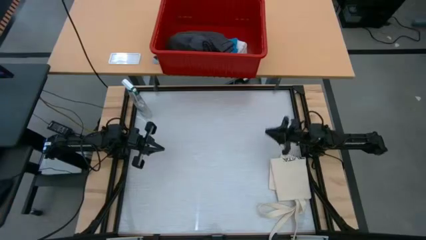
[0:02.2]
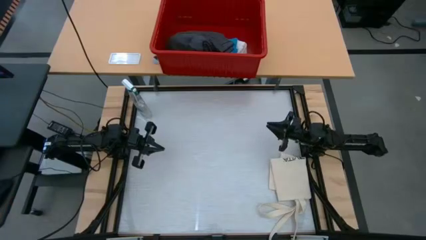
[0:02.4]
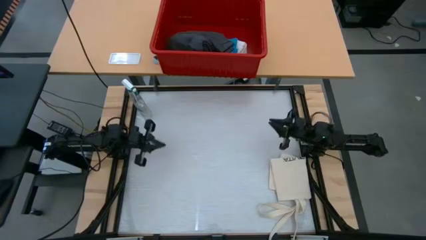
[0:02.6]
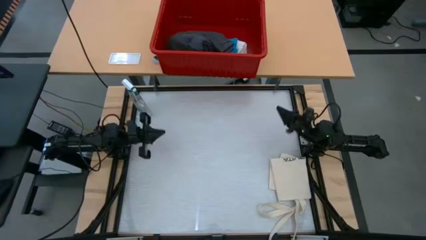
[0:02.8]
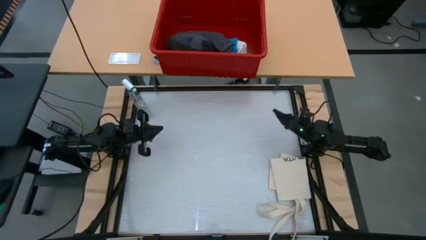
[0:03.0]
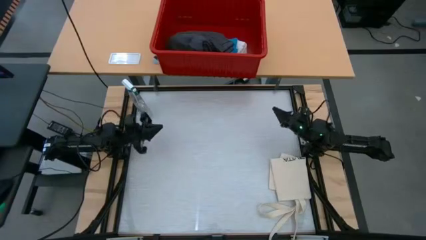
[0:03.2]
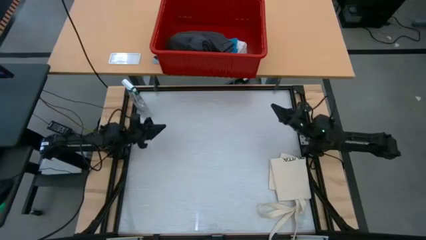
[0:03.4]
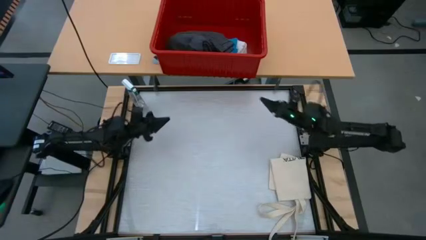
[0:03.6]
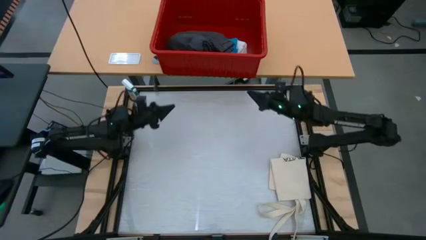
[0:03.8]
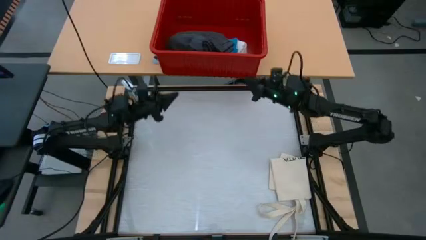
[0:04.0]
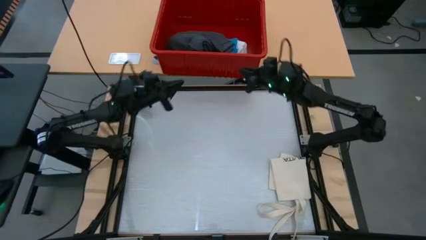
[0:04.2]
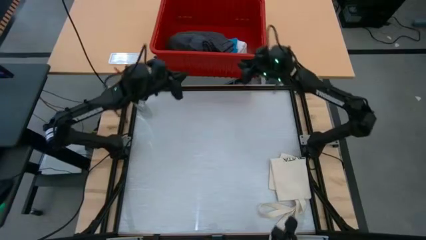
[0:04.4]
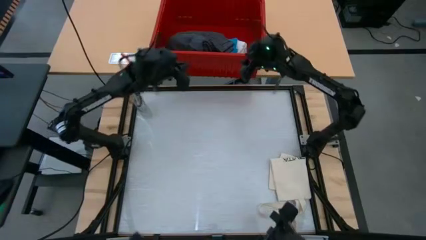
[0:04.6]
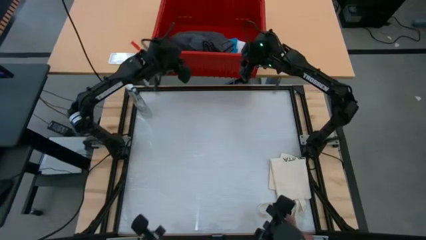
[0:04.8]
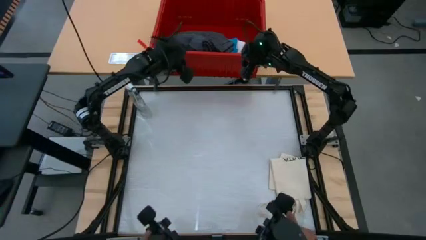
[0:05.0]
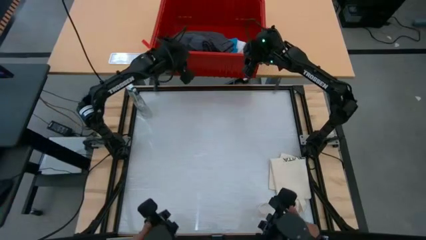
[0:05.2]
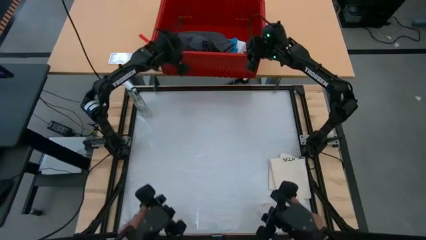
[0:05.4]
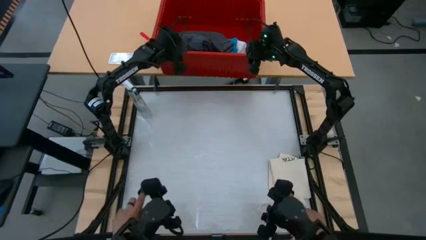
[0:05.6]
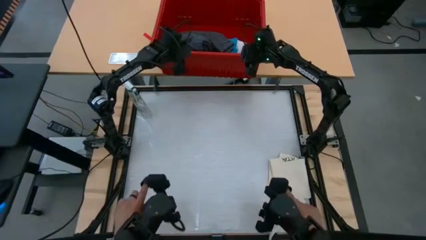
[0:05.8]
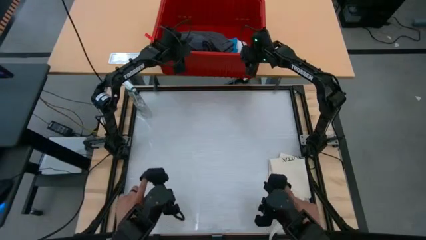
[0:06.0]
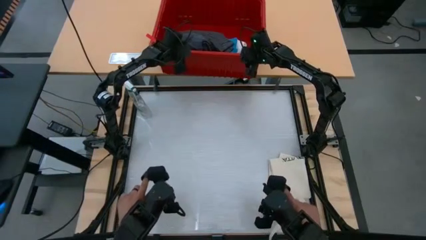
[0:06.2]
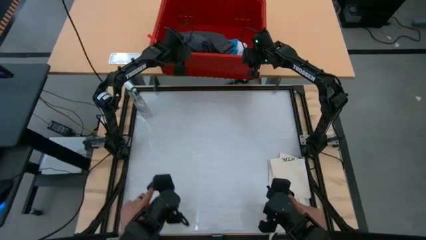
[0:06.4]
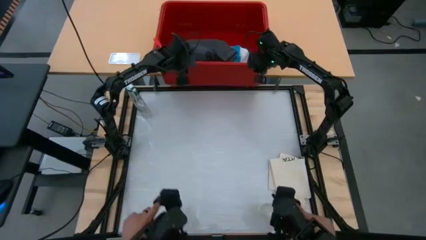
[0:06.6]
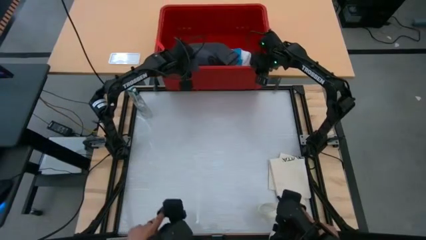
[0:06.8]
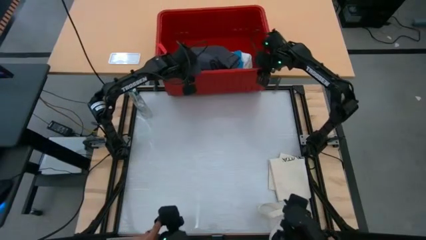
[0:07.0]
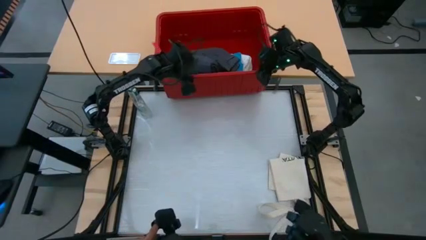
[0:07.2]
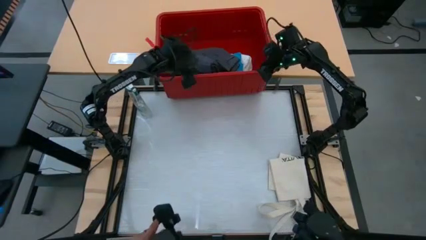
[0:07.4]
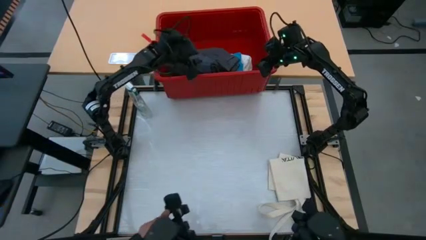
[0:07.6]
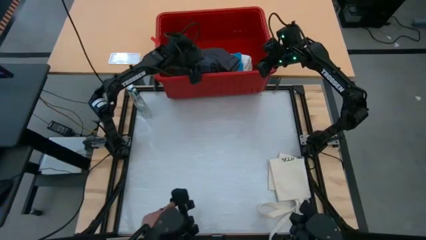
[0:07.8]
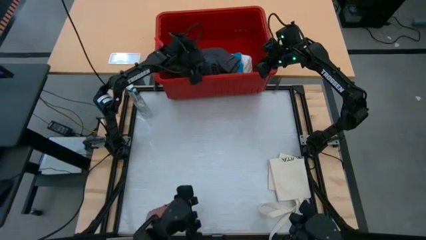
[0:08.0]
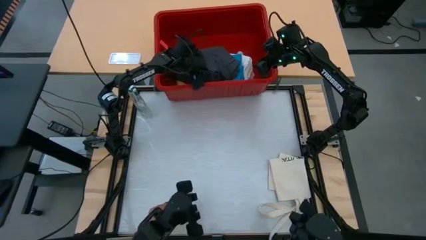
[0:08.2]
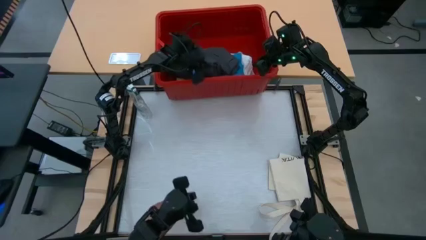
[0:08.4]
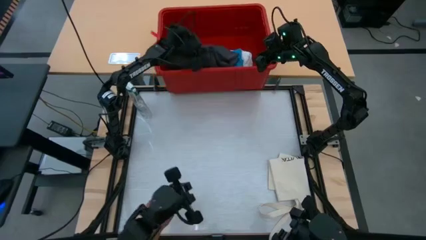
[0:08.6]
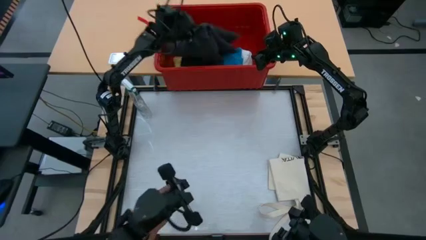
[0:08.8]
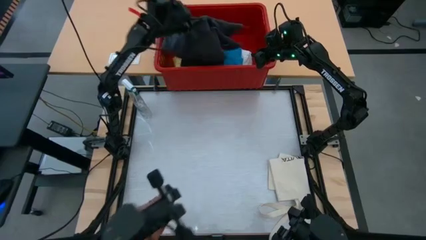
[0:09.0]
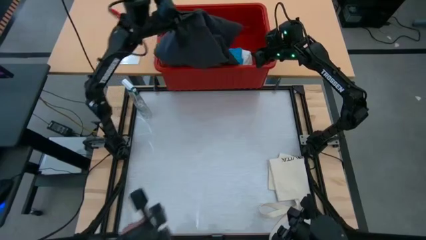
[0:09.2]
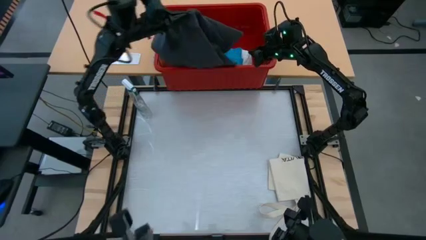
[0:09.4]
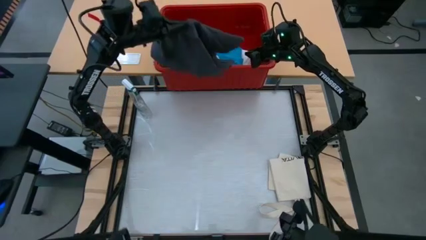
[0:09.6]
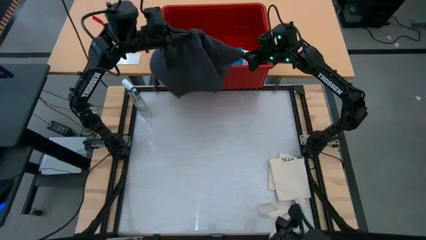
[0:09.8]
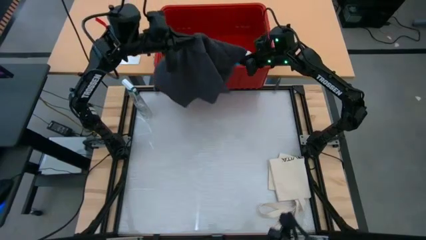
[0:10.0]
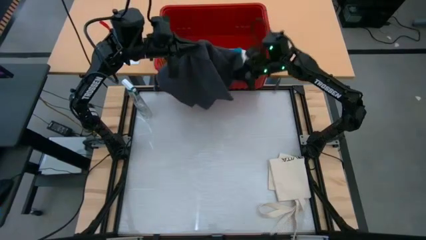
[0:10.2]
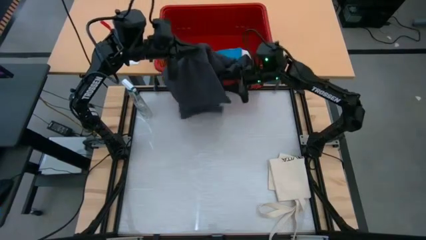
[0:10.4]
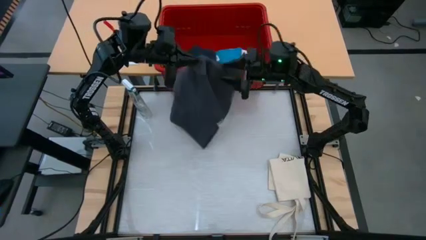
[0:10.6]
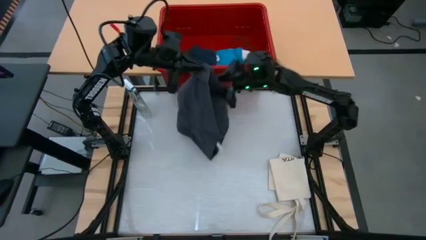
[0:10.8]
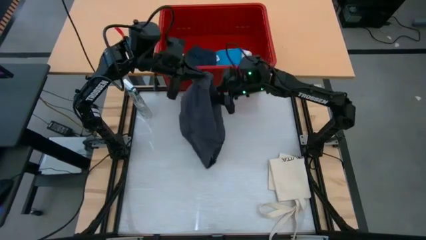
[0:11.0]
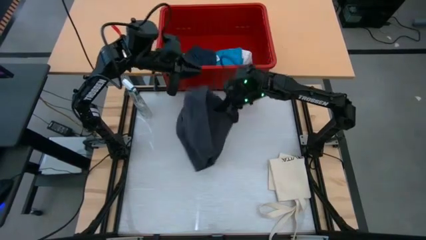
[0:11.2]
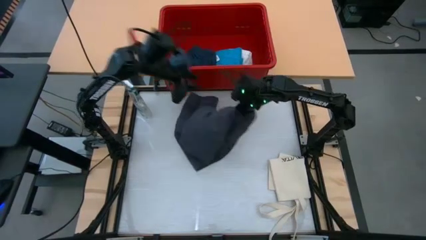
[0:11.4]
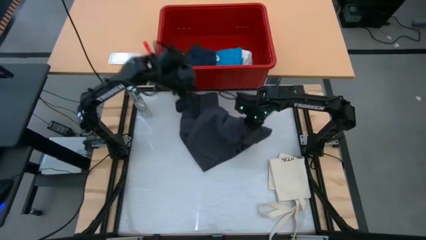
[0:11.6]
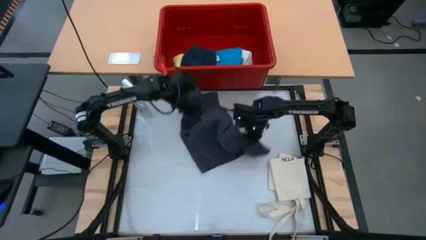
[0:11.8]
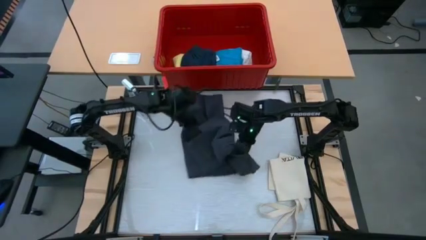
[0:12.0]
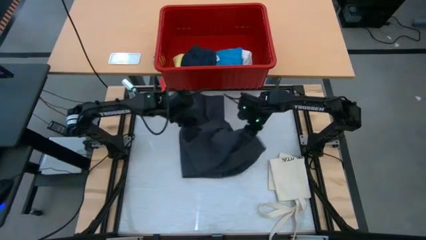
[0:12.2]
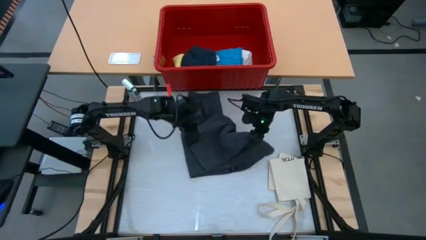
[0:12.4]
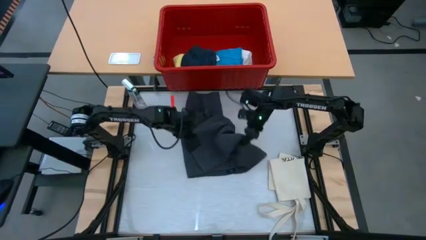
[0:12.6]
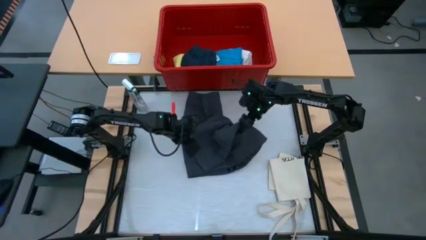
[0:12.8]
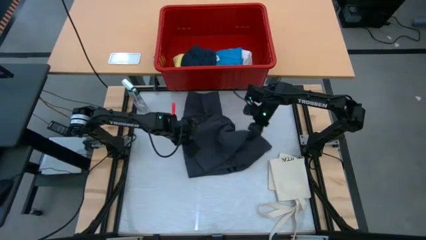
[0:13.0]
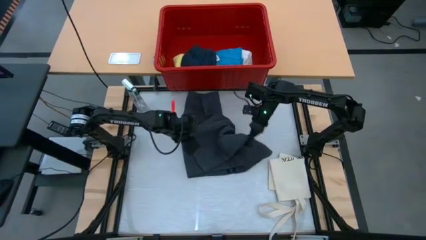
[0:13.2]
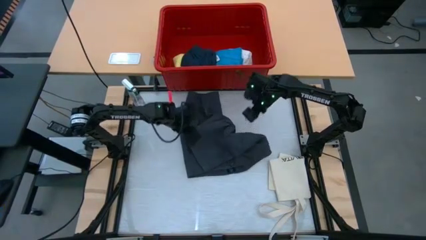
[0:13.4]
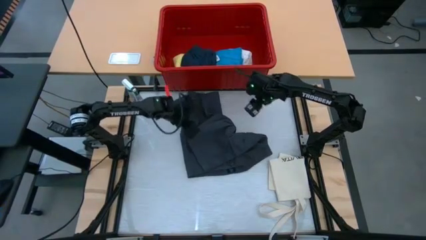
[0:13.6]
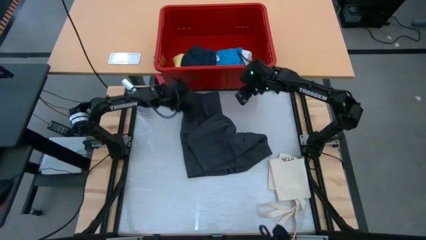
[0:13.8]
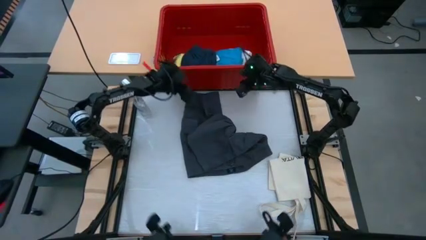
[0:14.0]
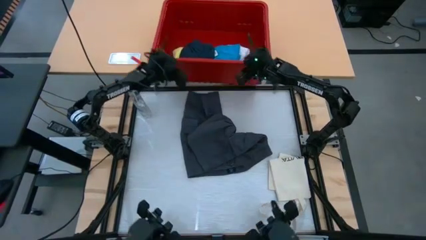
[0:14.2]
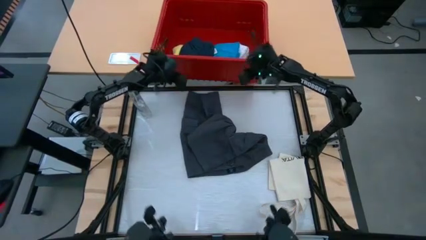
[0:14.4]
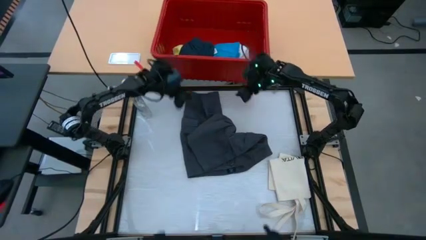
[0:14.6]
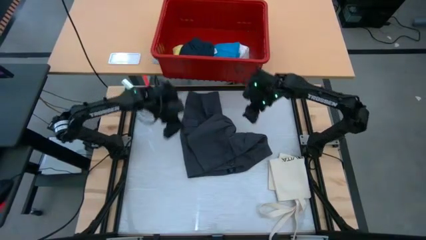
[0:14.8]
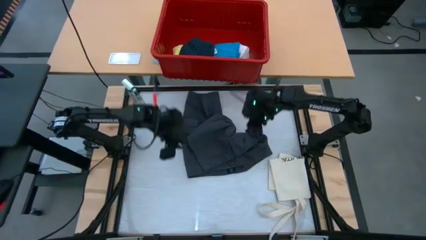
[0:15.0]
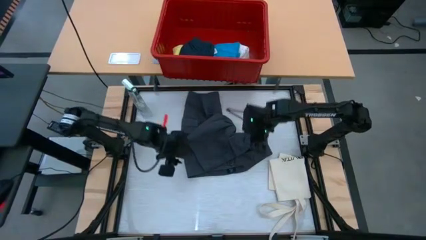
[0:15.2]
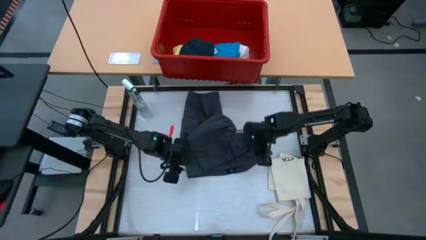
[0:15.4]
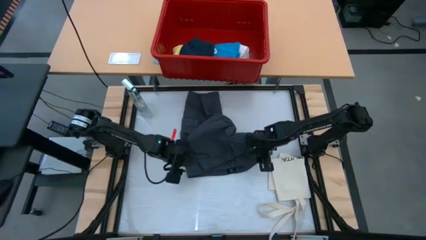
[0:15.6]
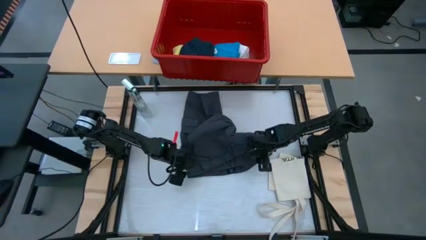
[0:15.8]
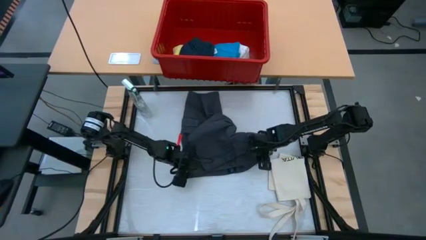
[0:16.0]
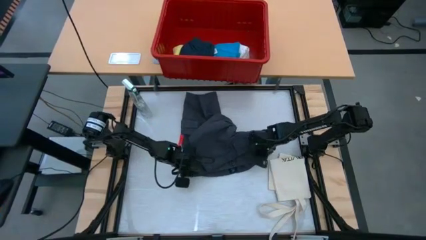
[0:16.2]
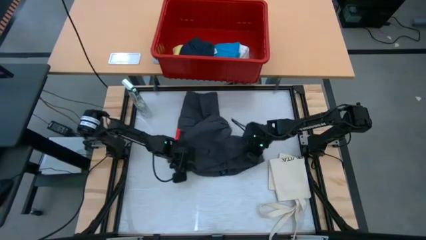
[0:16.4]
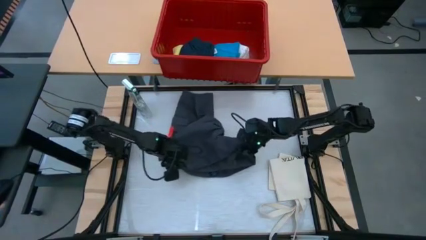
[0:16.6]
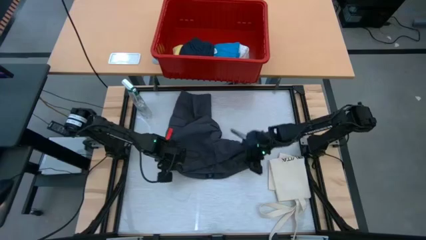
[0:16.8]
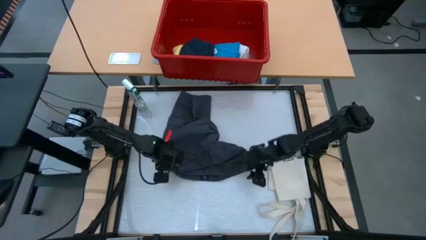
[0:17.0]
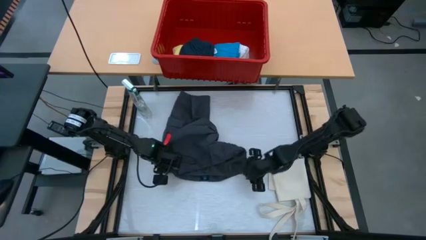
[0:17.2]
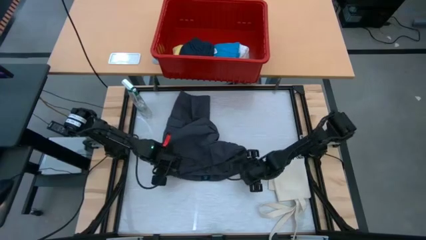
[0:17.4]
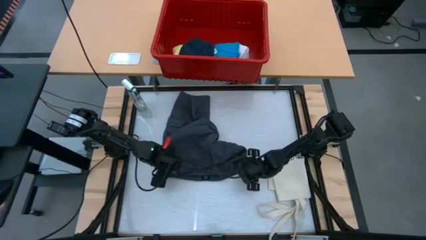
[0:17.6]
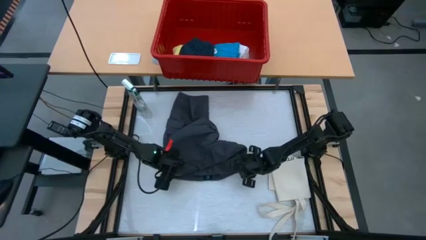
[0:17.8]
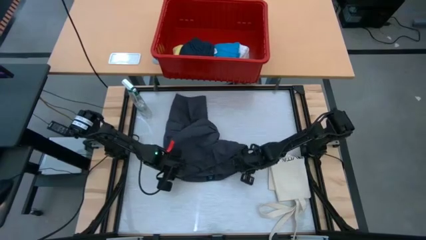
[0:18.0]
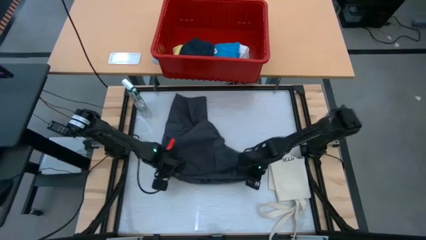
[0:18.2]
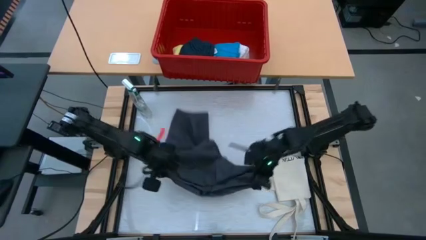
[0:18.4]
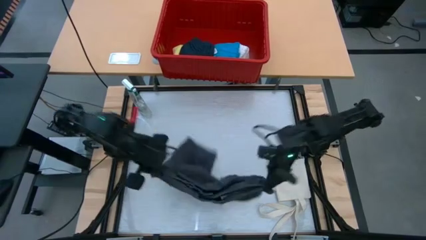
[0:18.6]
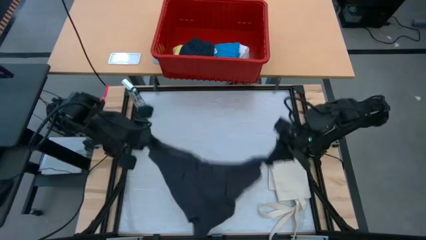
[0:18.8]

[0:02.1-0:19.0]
Task: Fold laundry
Fold the dark blue shorts
